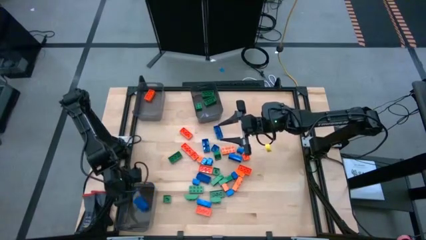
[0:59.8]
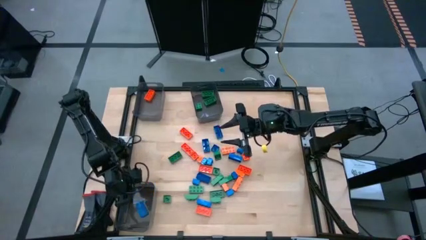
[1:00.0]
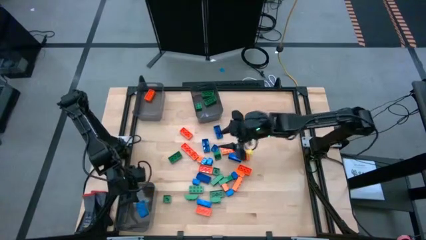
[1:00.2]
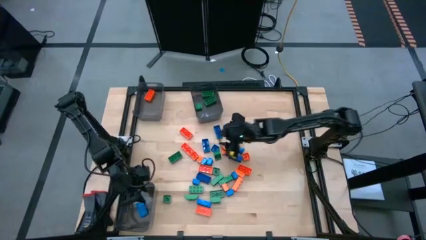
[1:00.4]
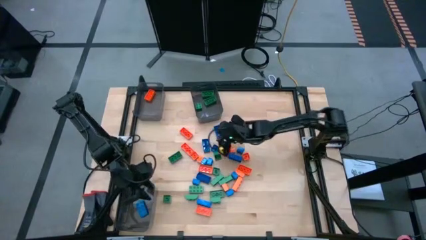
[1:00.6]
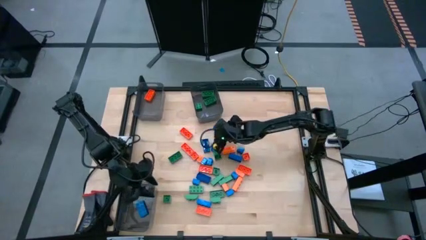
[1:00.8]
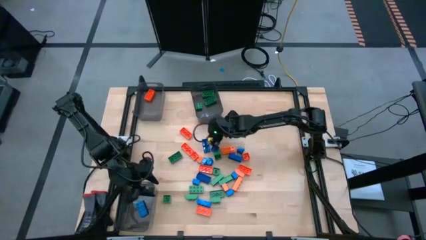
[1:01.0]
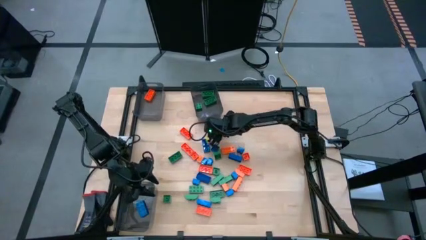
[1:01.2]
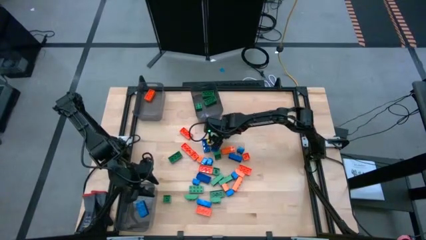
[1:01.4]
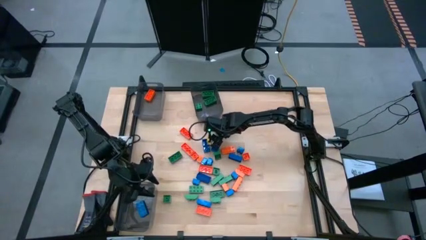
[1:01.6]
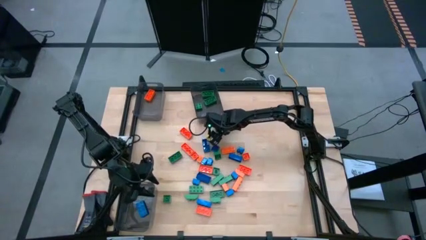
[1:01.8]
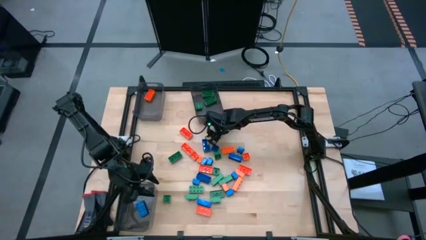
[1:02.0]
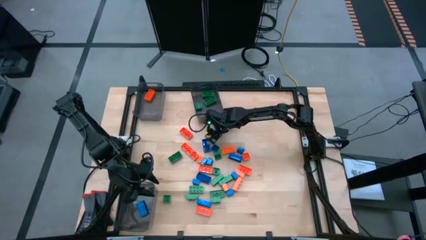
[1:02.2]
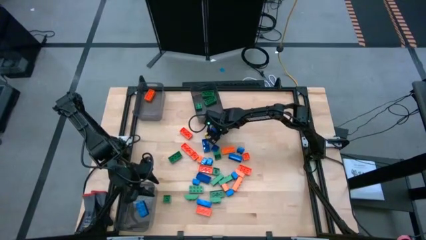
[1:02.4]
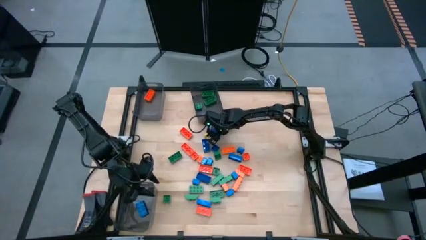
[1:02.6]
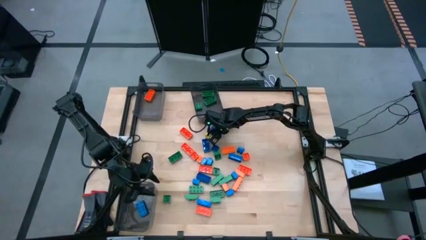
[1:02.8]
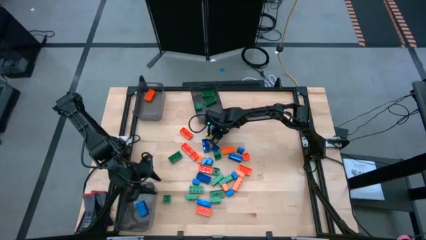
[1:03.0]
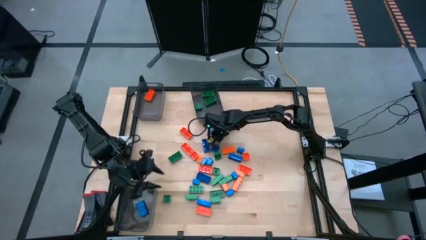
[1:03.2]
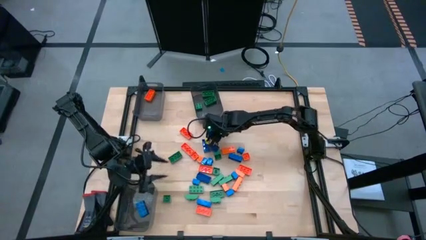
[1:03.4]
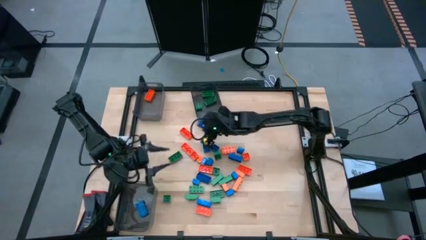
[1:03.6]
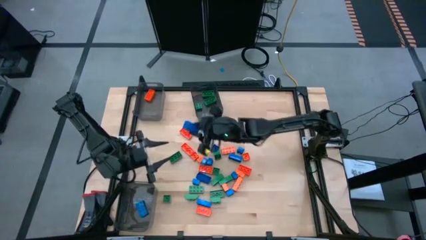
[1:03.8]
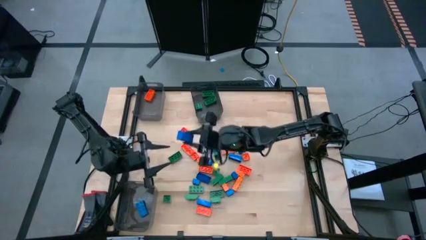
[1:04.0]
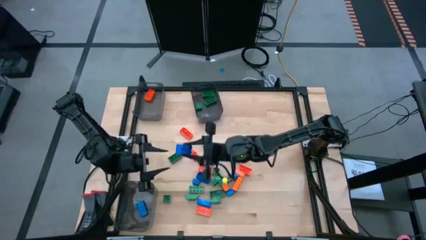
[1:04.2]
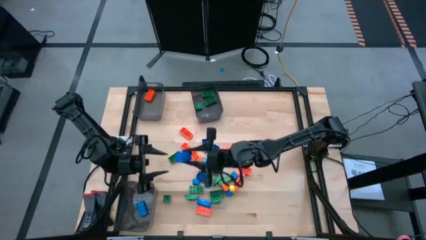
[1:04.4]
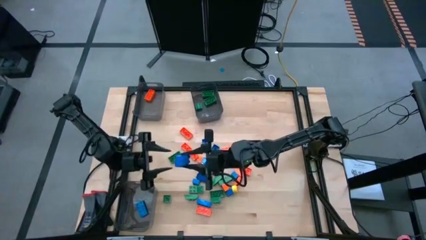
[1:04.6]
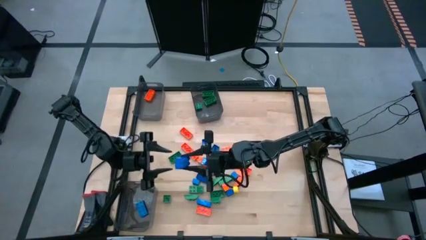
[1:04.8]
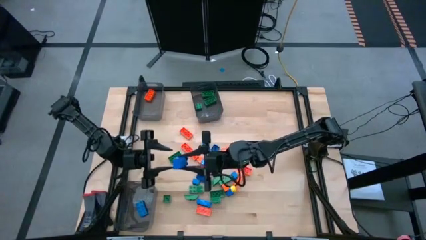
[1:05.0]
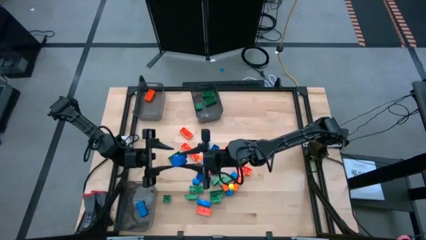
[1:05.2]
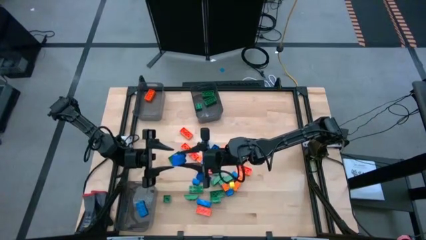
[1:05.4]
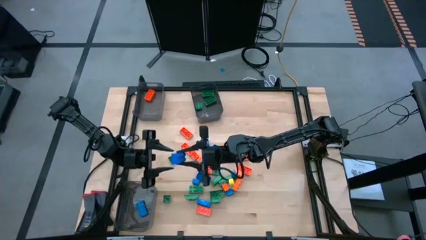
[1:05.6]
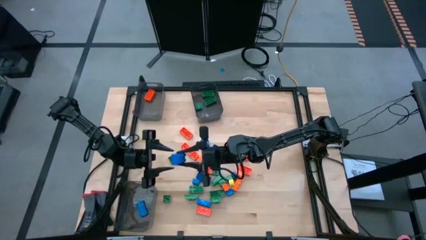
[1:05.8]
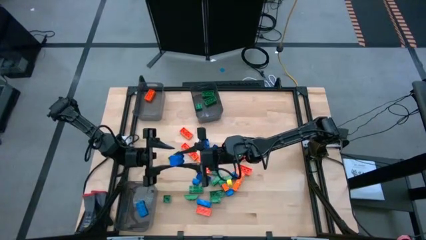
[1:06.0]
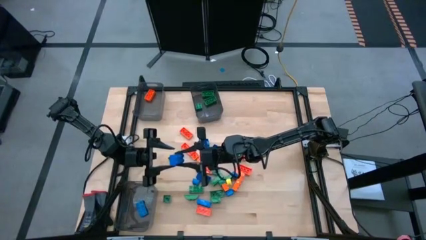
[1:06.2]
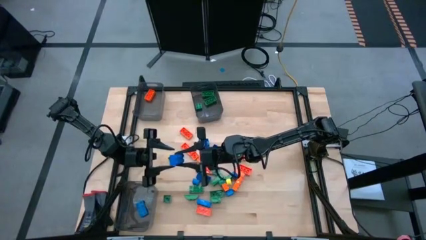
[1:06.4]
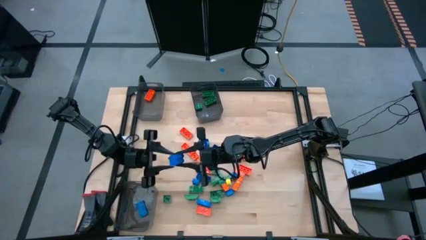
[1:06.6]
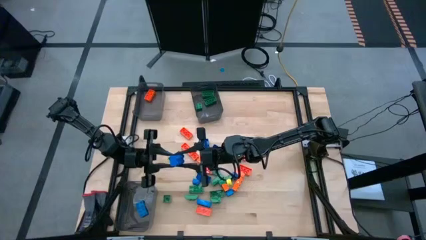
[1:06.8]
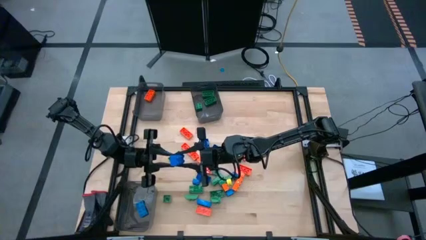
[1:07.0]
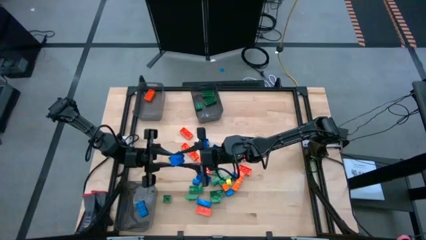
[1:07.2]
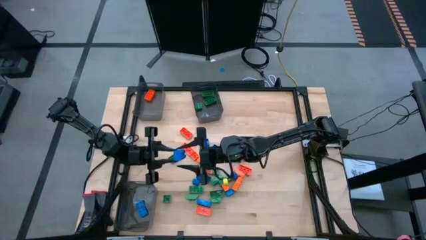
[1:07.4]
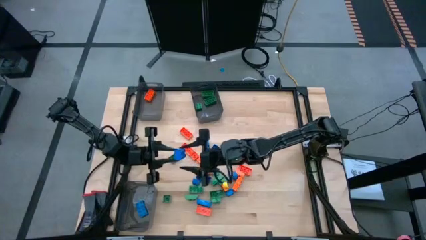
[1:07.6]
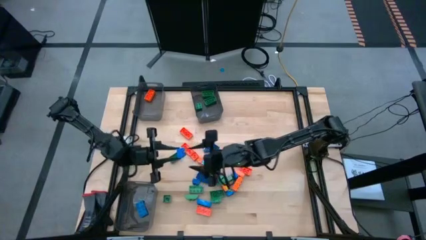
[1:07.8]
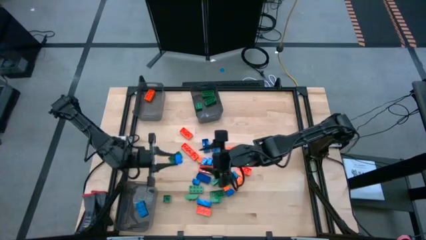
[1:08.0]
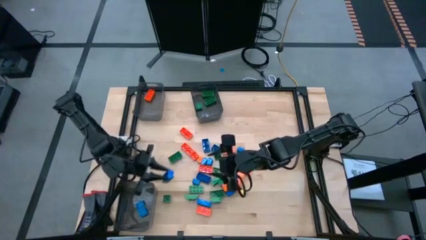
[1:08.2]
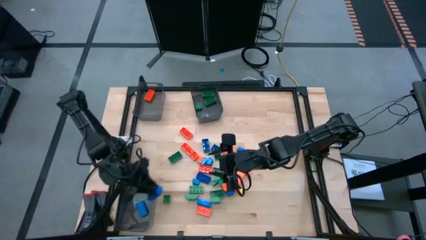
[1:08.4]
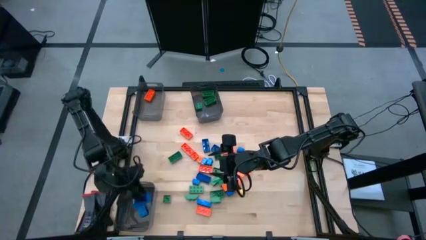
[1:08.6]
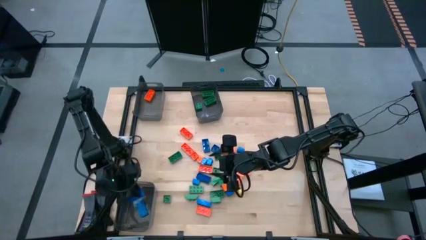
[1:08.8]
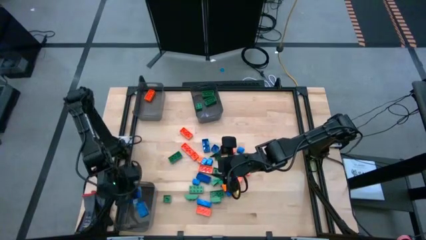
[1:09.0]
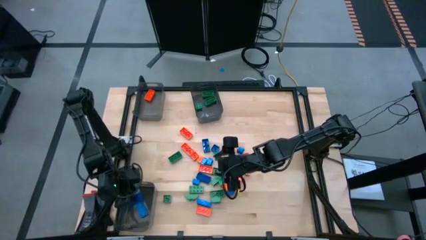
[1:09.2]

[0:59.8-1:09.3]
Task: Sort blocks
Put the blue game piece into the bottom left black transparent bin

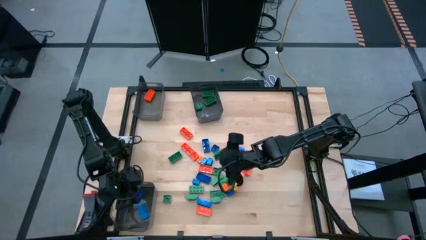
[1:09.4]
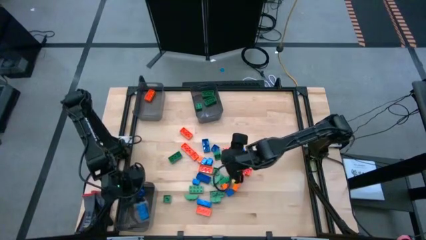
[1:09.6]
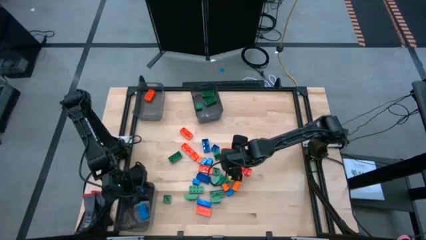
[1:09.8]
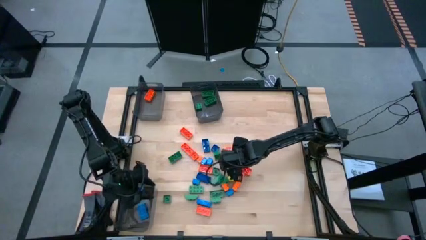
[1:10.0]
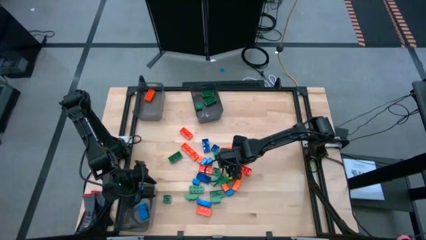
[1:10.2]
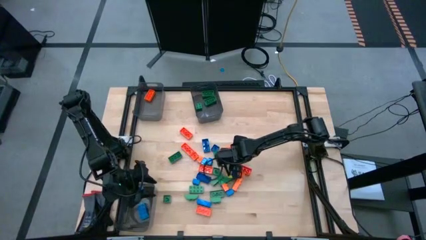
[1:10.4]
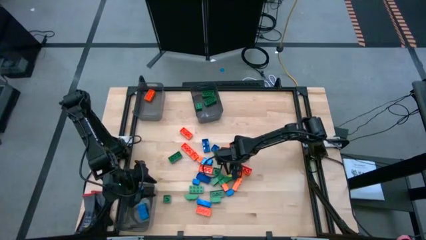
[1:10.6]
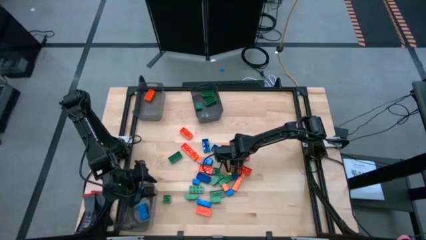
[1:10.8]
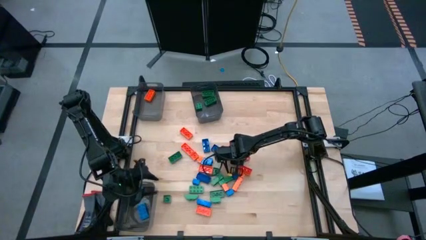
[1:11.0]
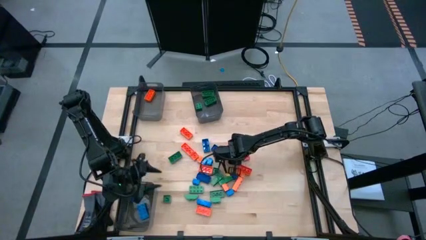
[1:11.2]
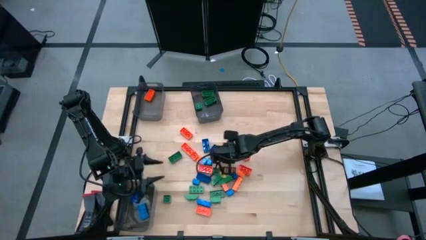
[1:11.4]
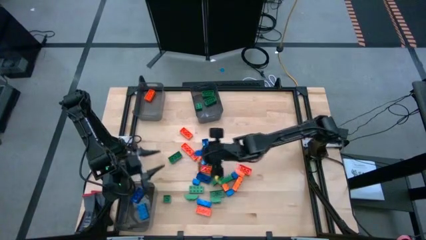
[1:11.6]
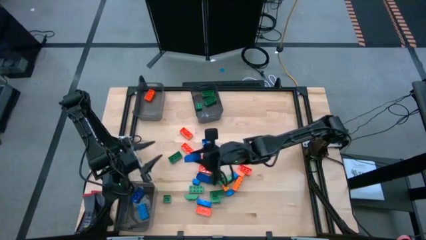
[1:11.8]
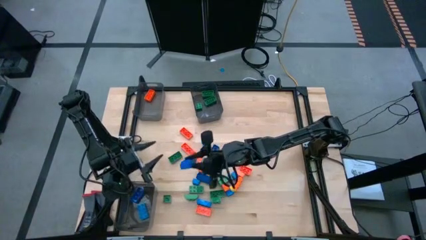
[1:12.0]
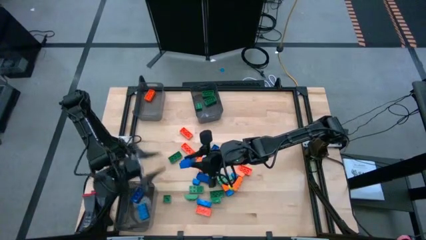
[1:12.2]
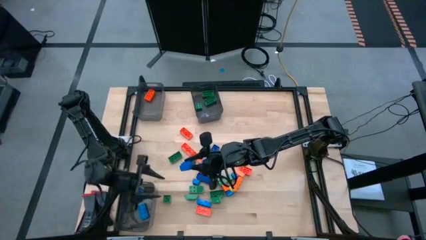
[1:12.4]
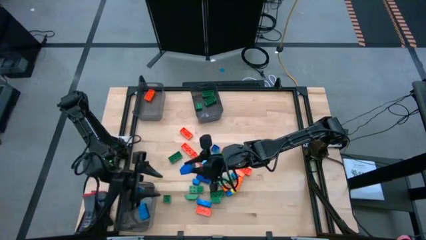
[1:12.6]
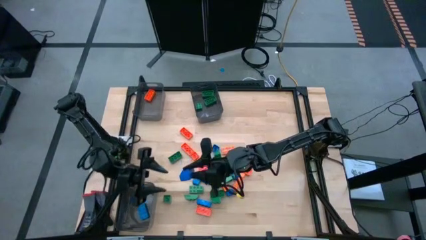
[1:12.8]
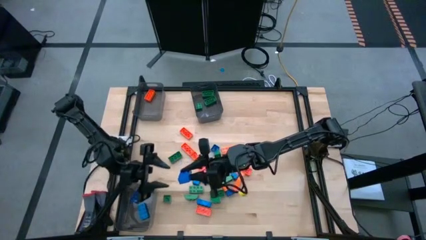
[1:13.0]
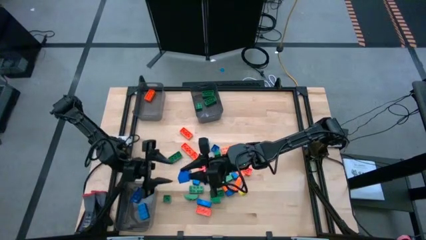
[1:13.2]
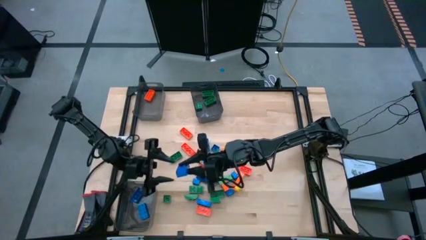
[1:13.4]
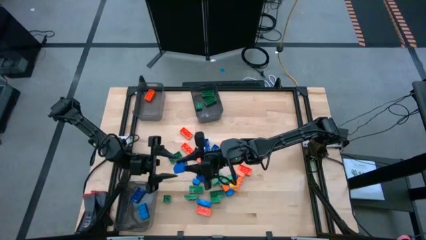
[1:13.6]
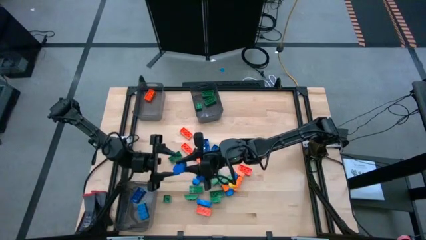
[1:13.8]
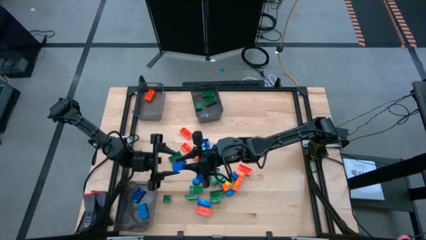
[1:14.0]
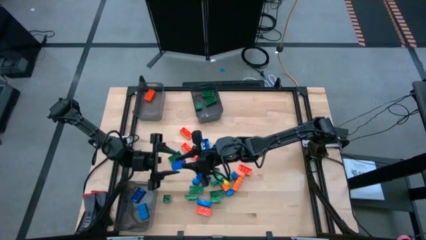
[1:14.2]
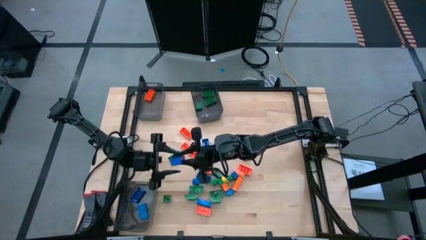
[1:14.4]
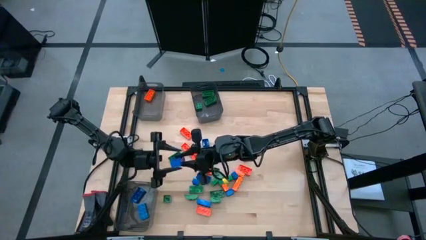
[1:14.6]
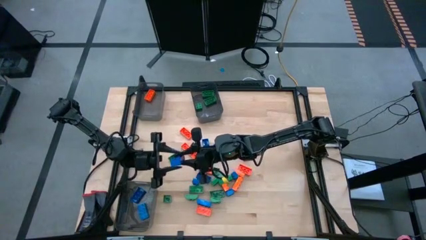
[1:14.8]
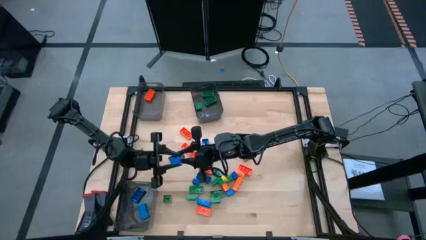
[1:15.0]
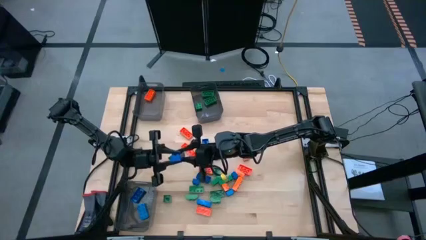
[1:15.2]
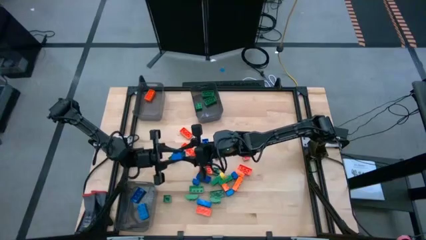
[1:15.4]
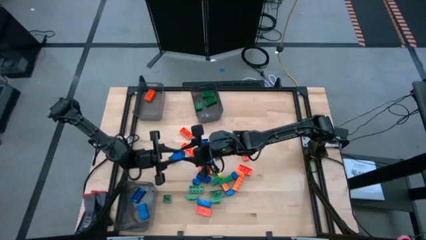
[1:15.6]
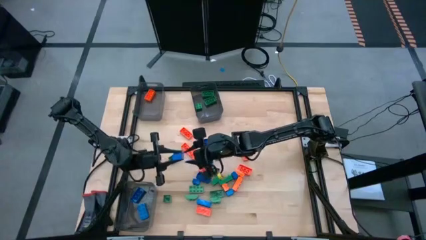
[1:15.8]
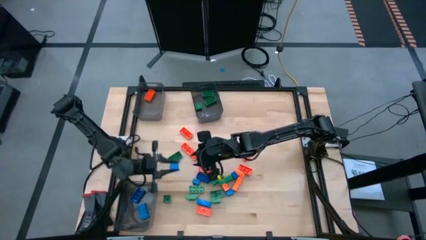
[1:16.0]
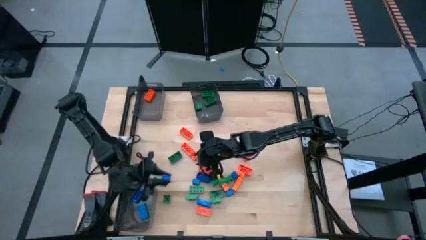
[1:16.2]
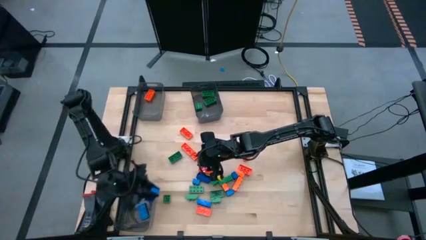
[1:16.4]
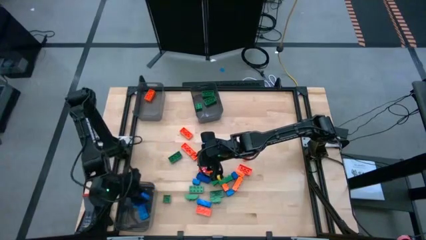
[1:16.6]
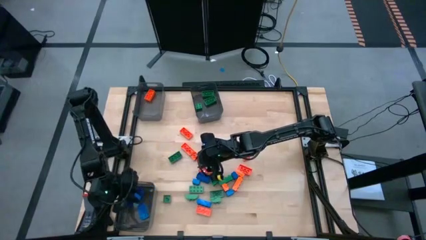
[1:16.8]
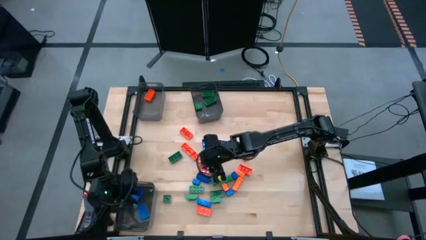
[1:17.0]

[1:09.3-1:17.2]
Put the blue game piece into the bottom left black transparent bin
